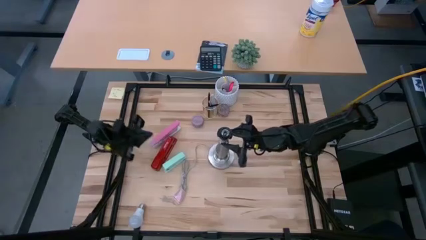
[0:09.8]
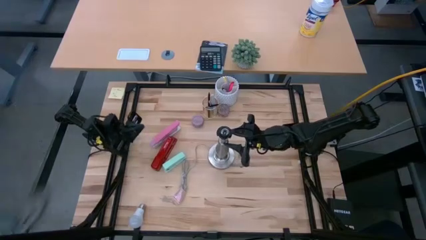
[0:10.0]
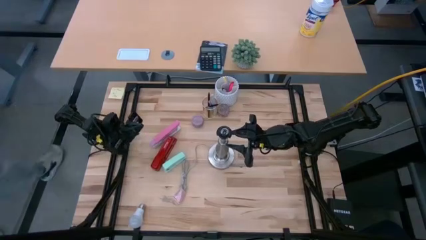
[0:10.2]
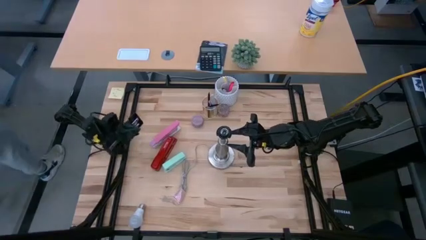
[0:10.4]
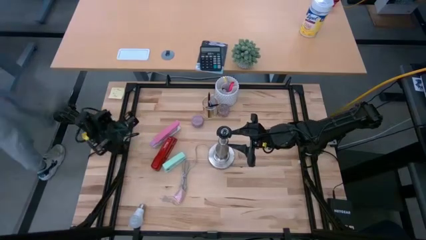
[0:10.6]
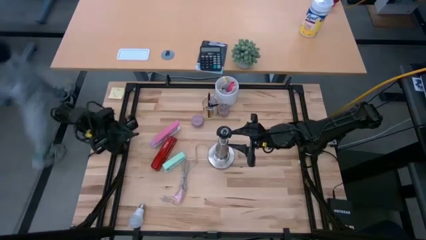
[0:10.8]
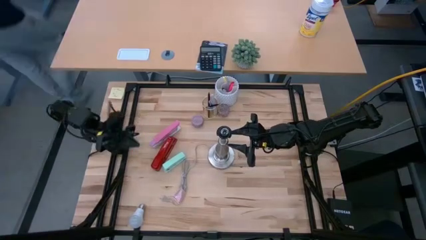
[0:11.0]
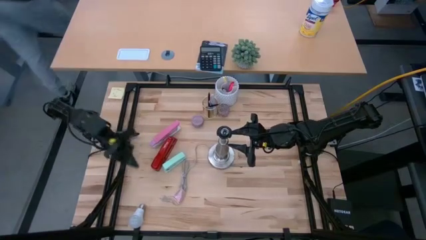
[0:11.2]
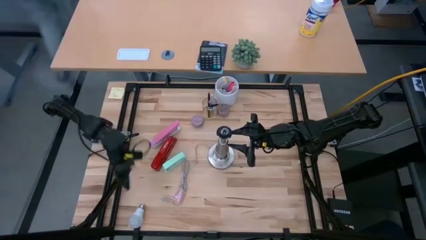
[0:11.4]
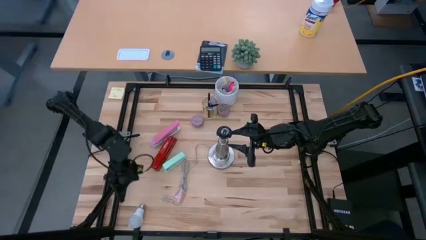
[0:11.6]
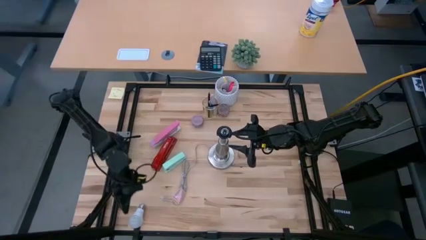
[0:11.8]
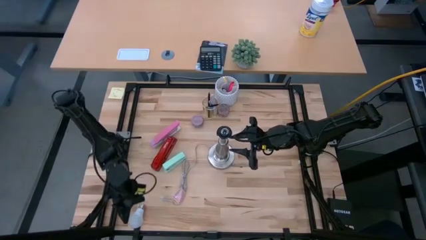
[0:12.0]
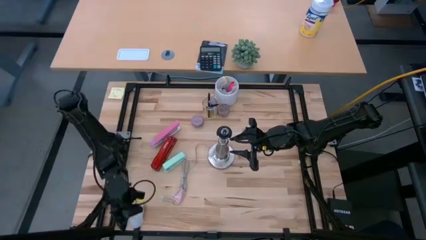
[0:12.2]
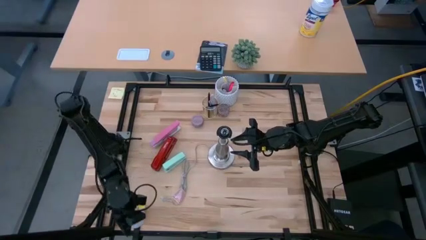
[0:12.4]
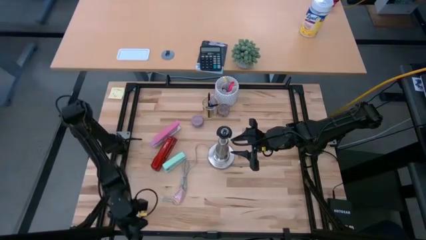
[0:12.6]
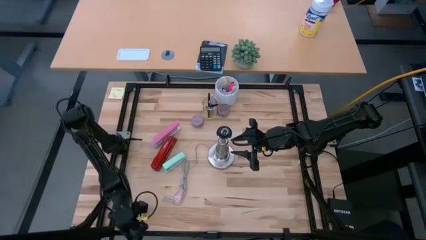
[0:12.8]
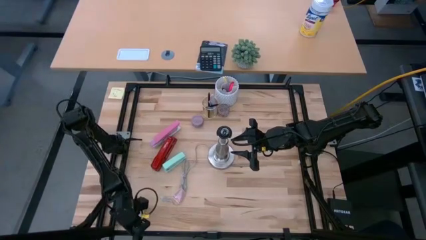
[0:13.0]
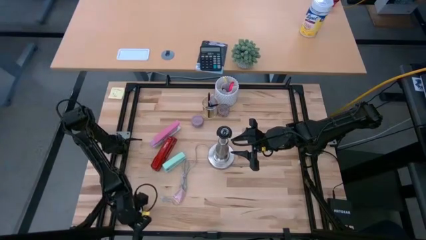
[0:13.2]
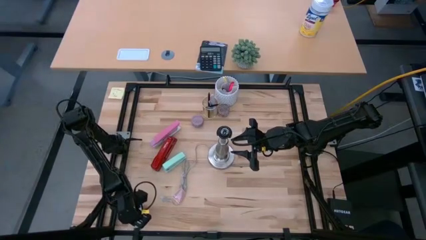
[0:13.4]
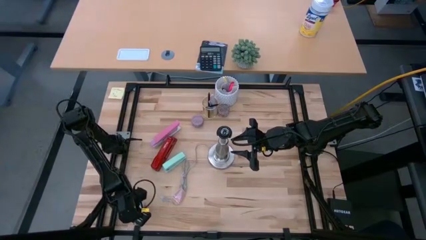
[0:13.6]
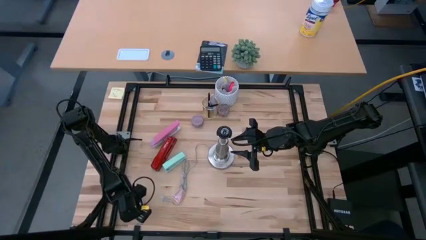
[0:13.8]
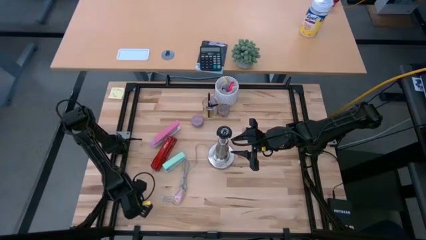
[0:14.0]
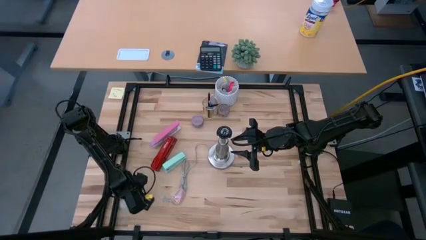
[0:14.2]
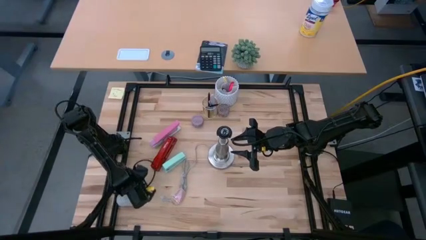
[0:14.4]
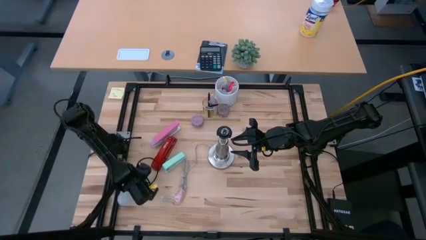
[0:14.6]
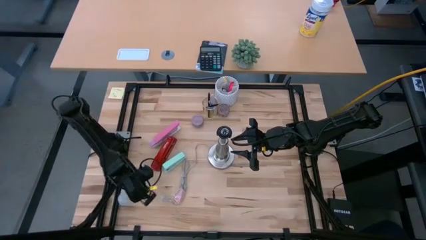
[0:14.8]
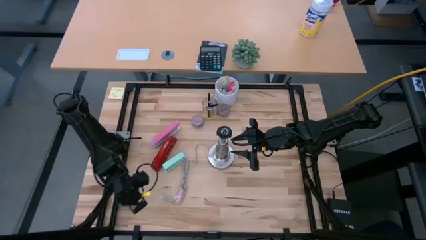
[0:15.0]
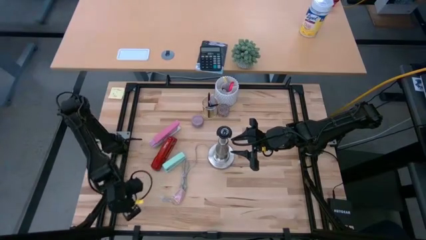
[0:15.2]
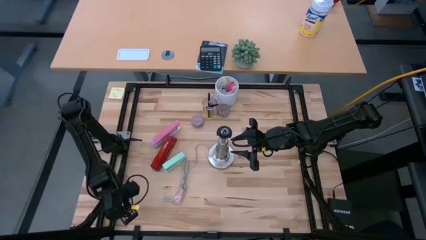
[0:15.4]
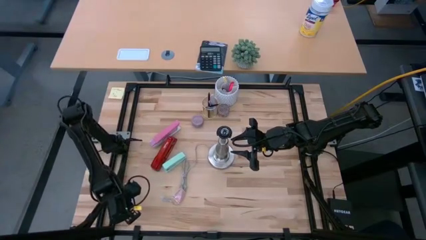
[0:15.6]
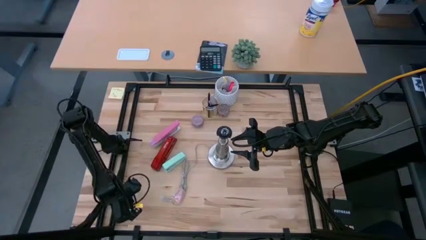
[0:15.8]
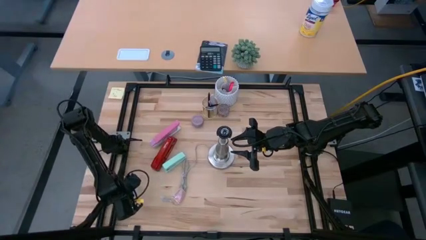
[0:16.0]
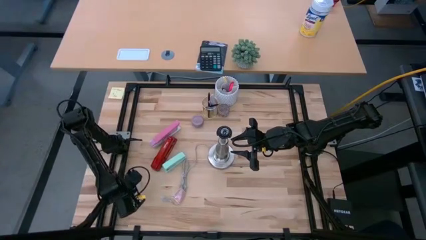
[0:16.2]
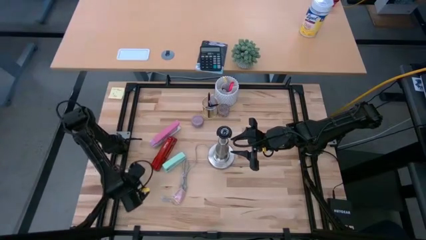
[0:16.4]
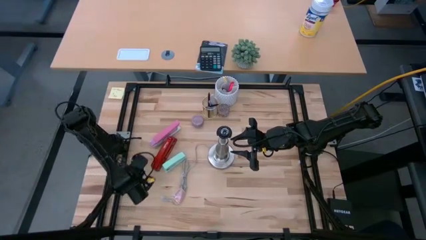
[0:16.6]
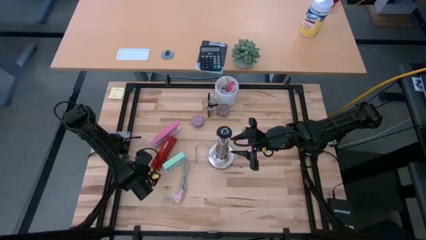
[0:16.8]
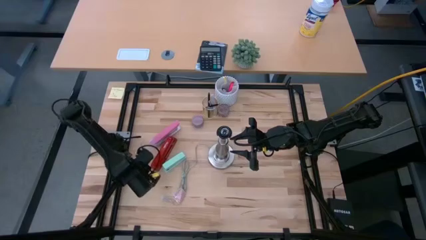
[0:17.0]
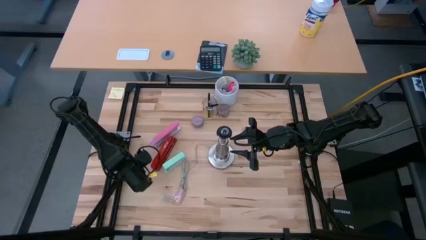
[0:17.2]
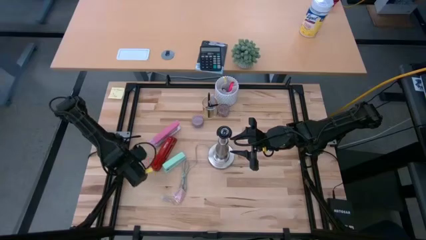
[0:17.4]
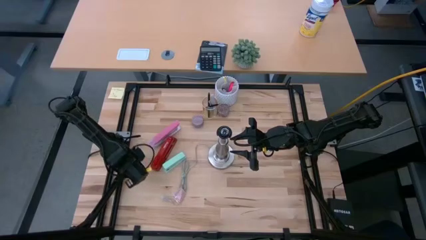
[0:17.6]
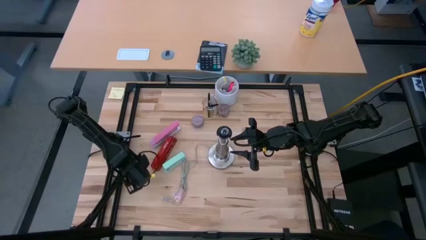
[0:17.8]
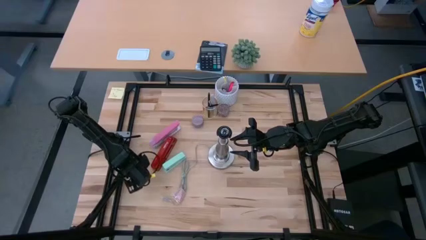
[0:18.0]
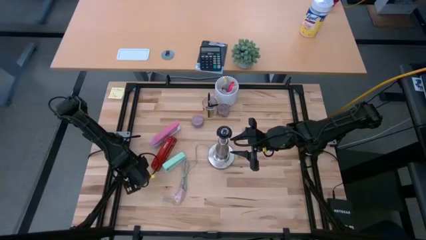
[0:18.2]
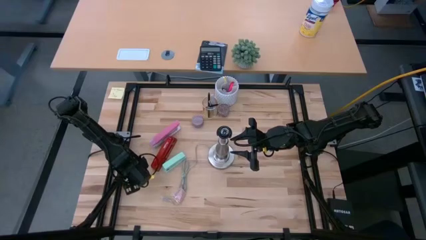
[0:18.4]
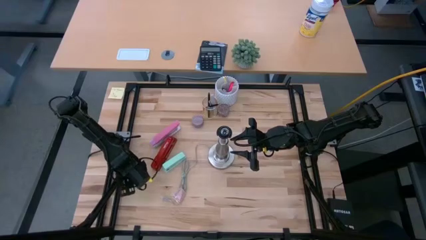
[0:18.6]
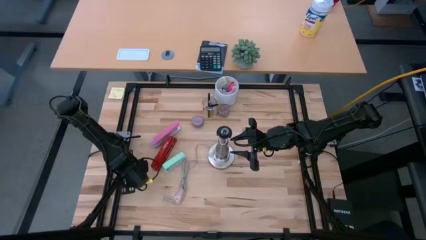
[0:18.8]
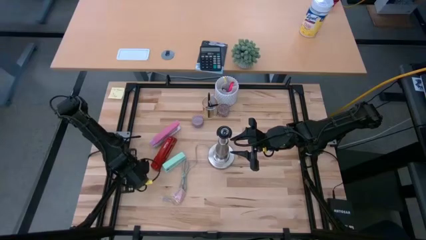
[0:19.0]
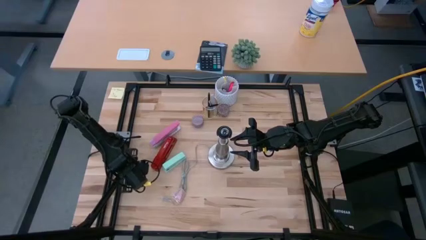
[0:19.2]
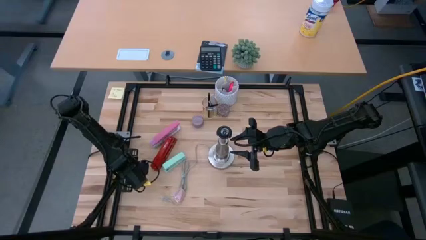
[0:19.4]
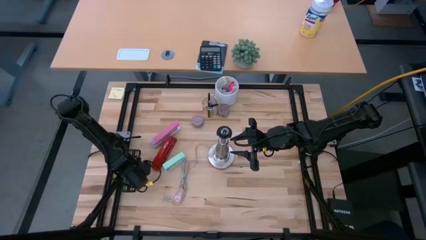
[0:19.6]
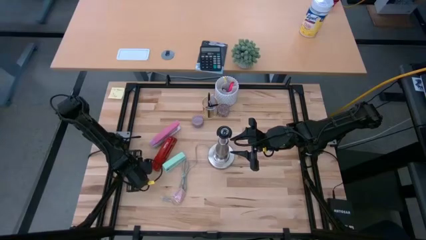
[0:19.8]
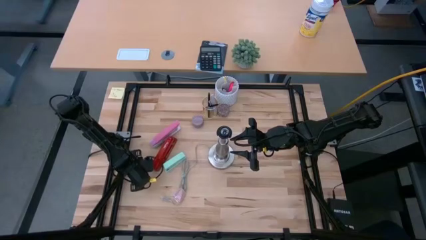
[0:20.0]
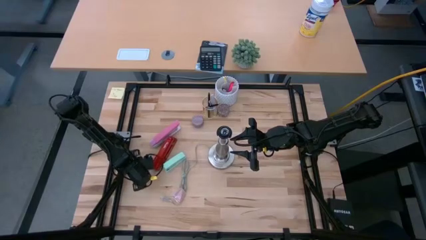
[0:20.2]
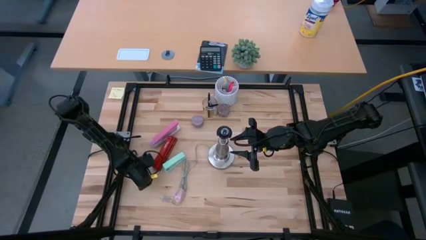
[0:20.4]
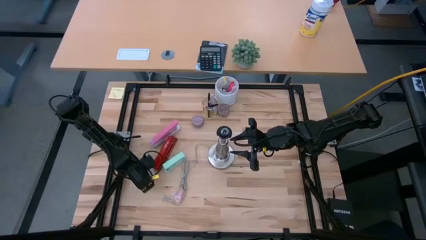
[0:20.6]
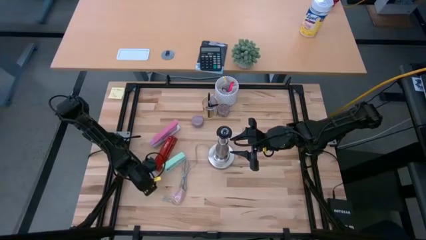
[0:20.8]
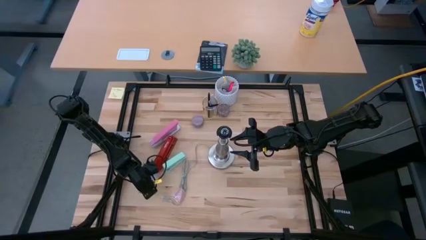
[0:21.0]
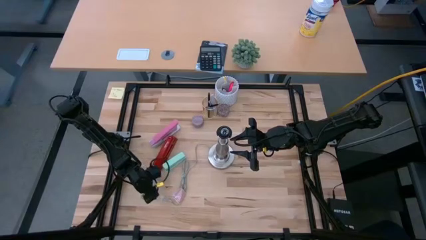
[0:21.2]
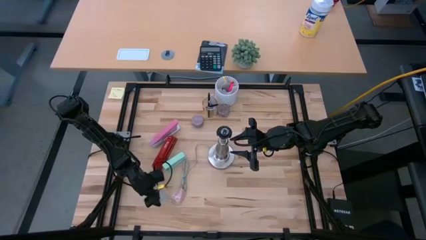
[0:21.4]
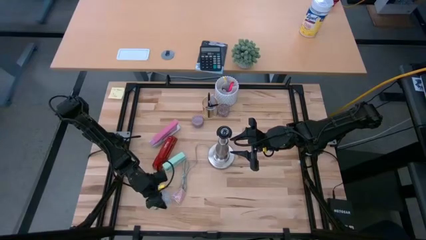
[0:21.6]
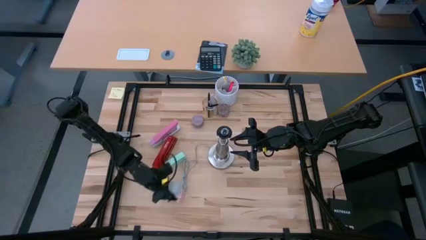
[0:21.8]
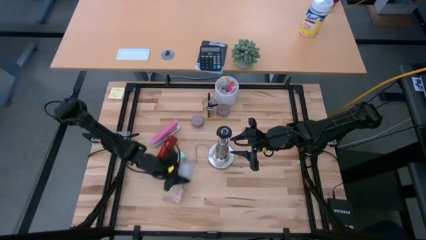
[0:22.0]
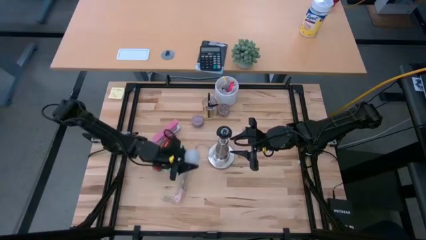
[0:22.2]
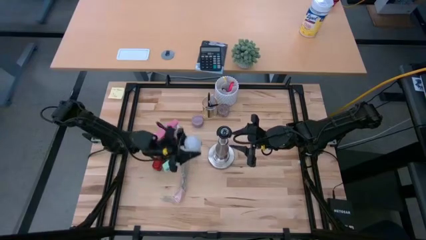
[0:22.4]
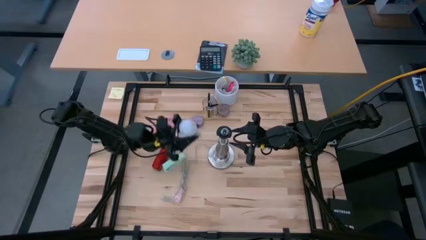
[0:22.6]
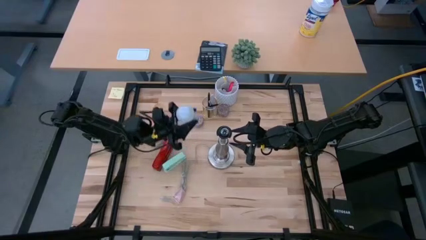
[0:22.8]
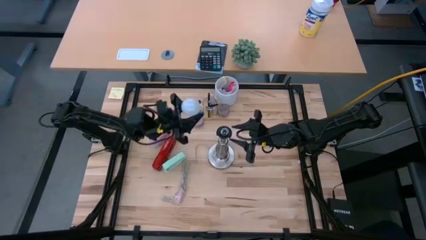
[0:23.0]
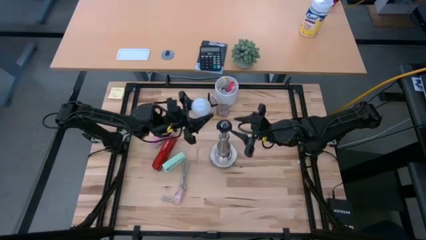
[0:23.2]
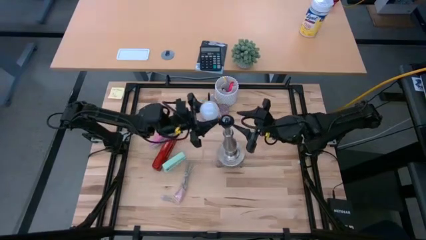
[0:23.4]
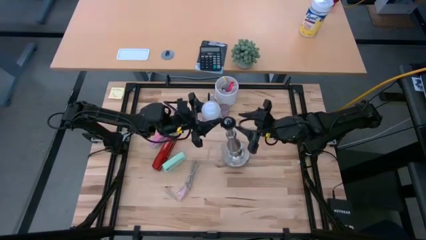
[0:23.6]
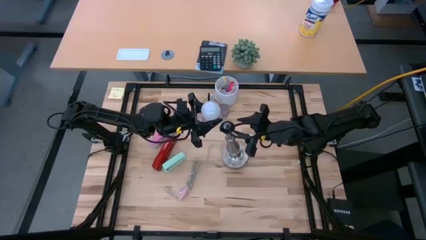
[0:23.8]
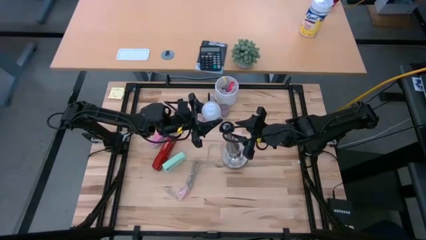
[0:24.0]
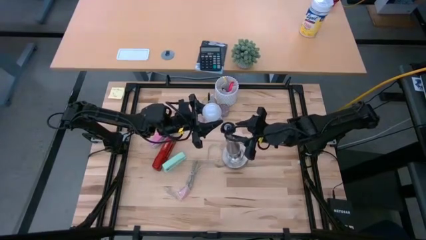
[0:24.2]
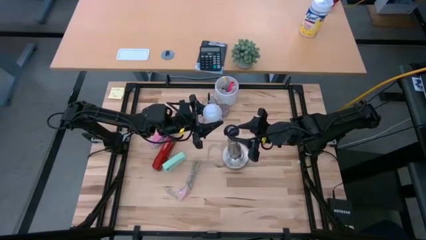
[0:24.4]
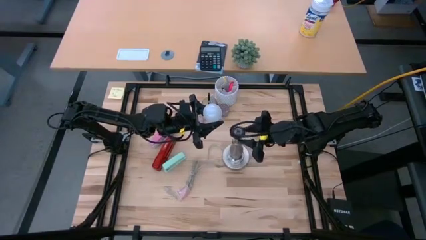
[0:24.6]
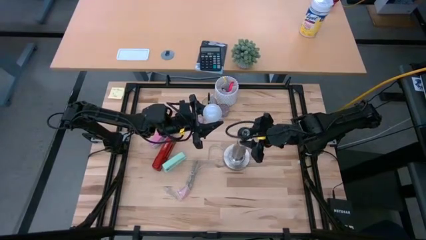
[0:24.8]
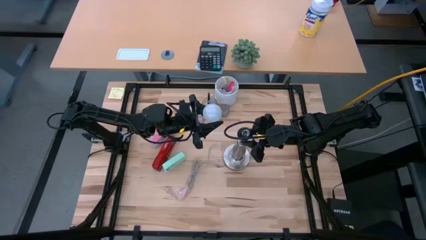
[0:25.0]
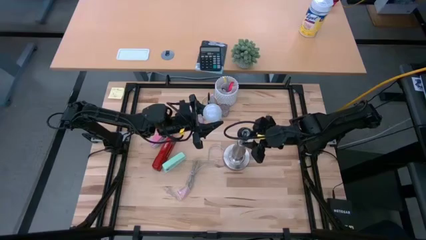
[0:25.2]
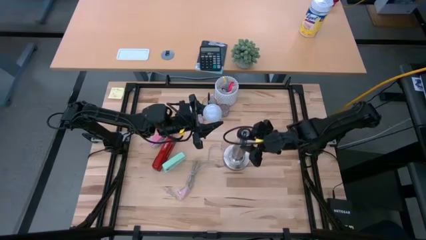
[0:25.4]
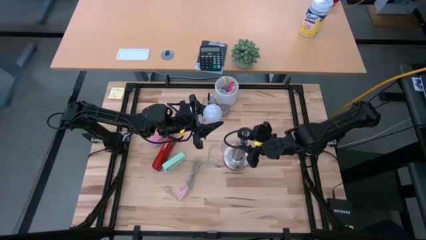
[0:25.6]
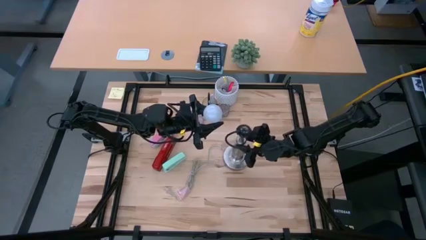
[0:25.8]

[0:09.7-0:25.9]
Task: Screw lightbulb
Insert the lightbulb to the lamp
